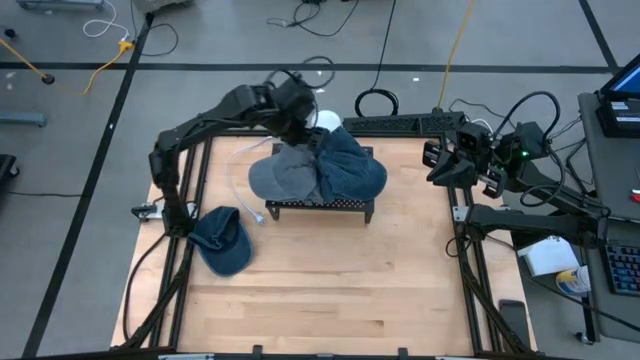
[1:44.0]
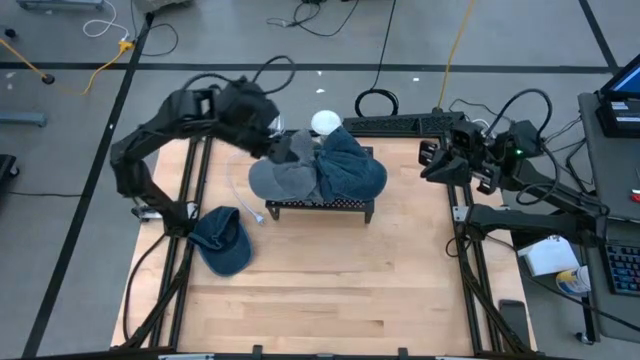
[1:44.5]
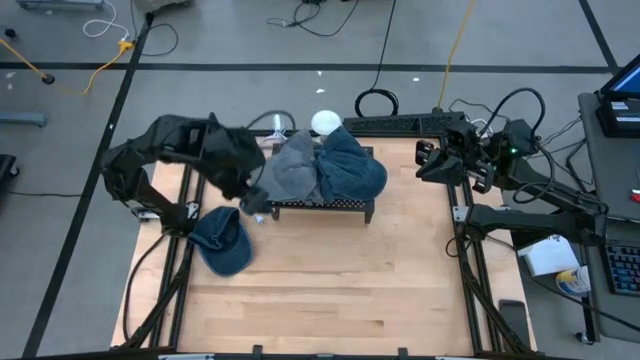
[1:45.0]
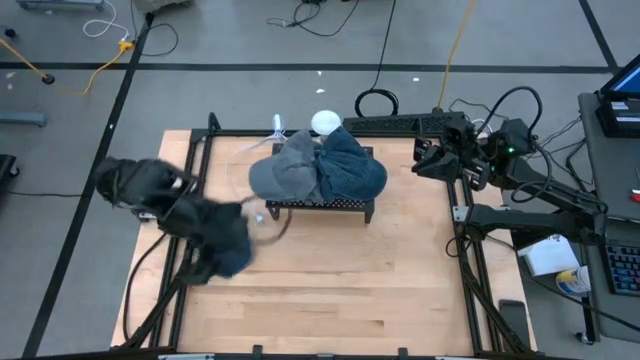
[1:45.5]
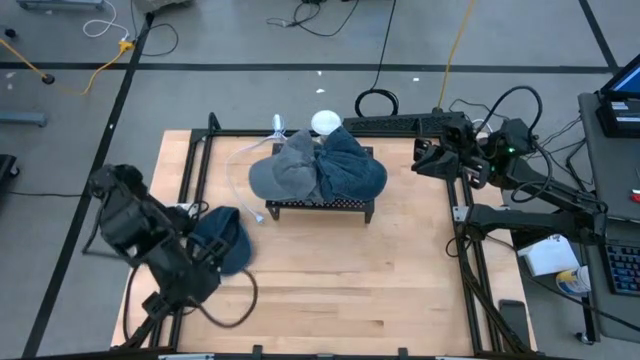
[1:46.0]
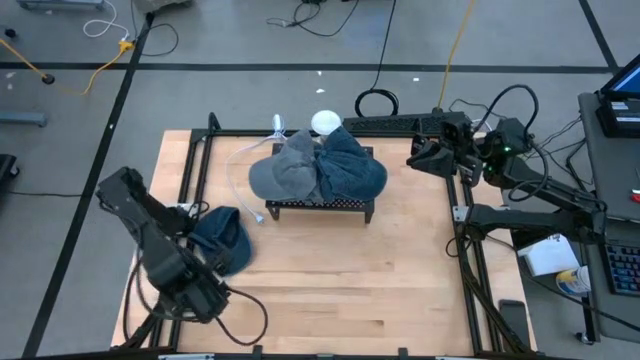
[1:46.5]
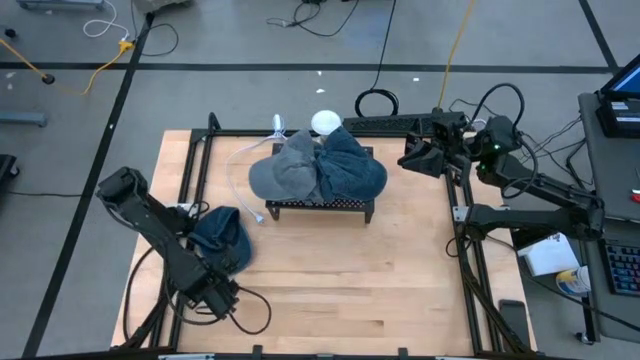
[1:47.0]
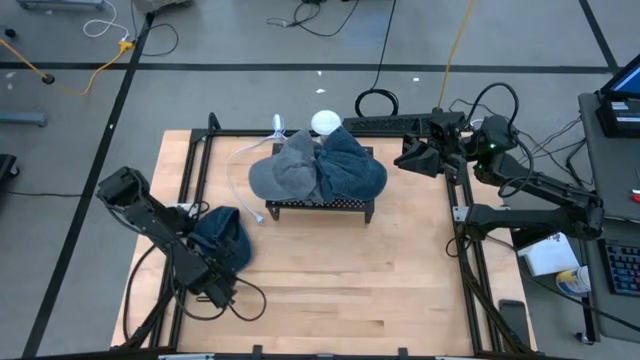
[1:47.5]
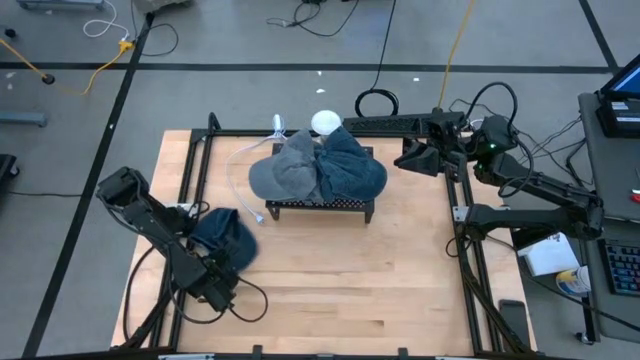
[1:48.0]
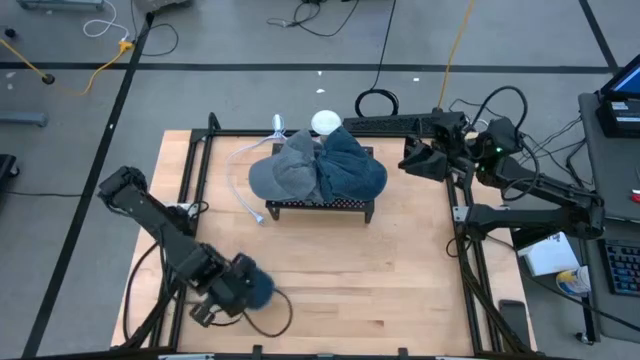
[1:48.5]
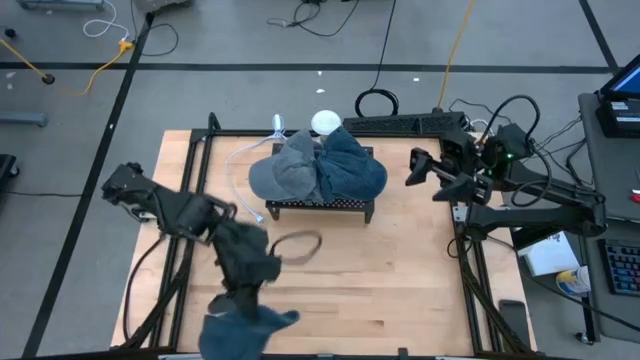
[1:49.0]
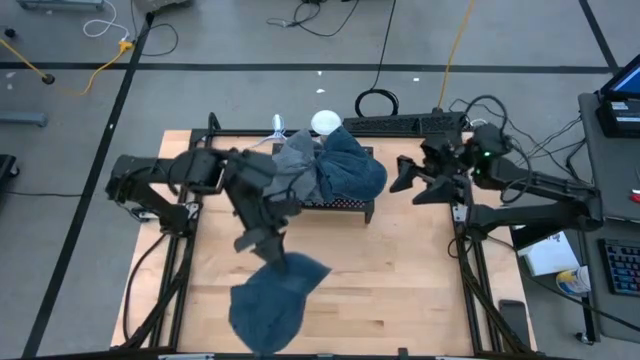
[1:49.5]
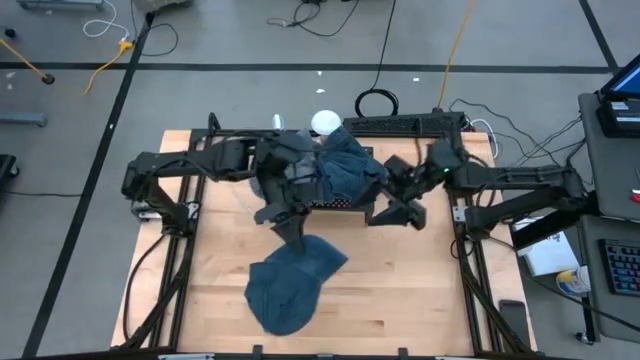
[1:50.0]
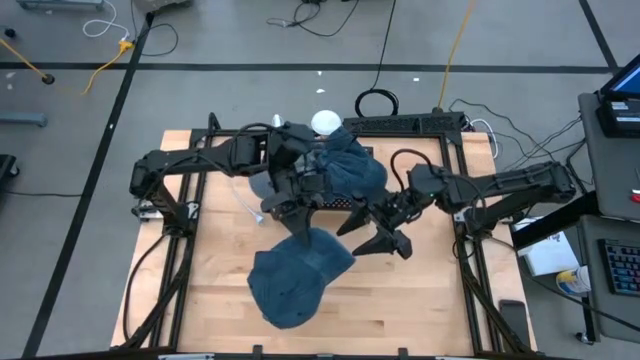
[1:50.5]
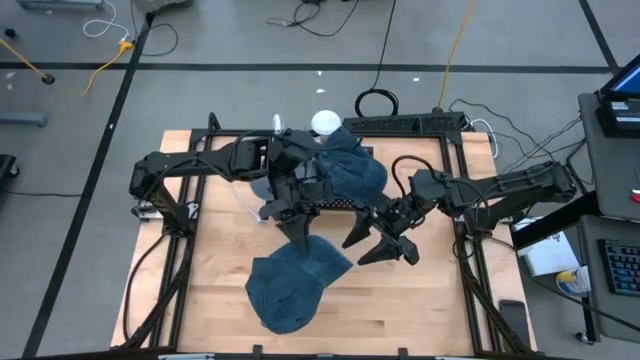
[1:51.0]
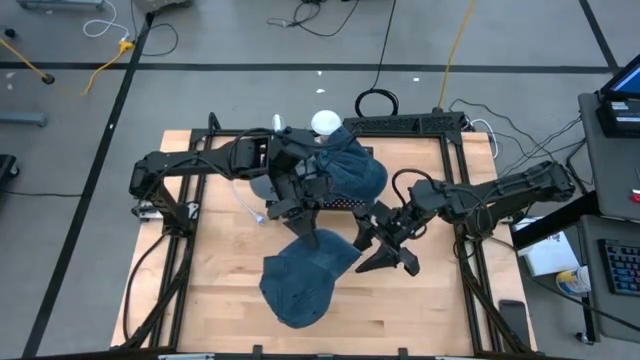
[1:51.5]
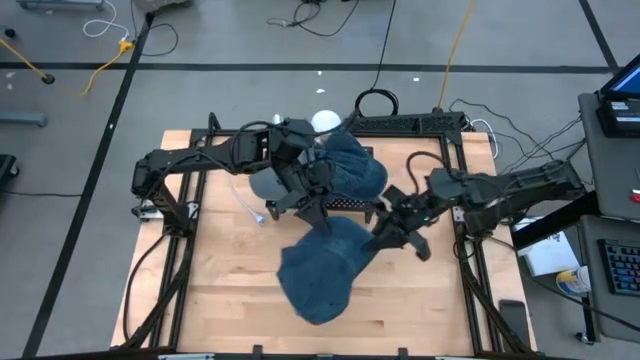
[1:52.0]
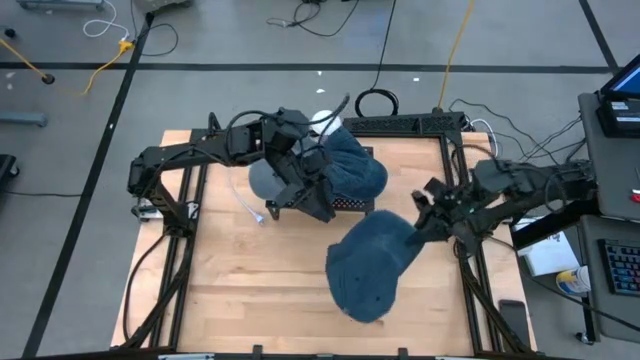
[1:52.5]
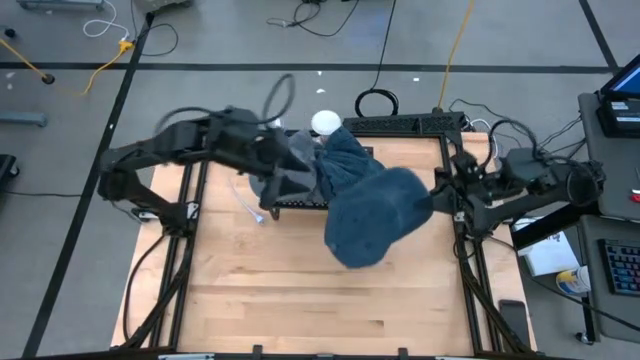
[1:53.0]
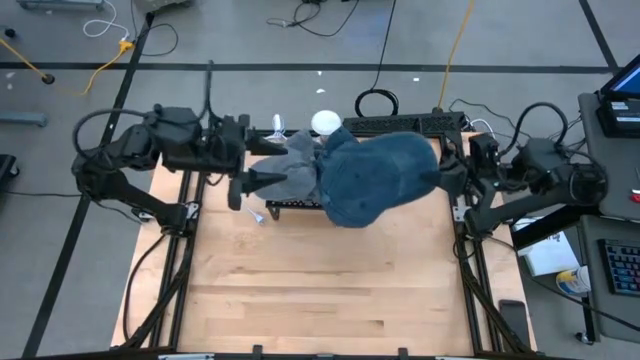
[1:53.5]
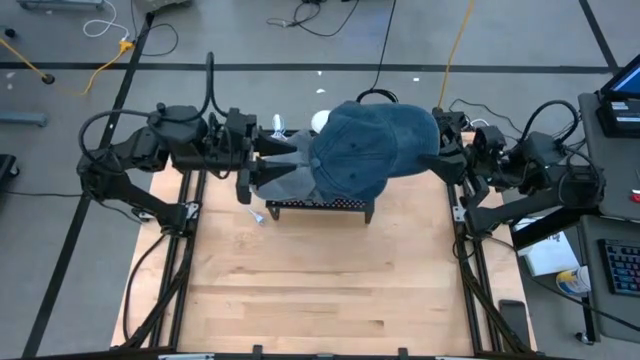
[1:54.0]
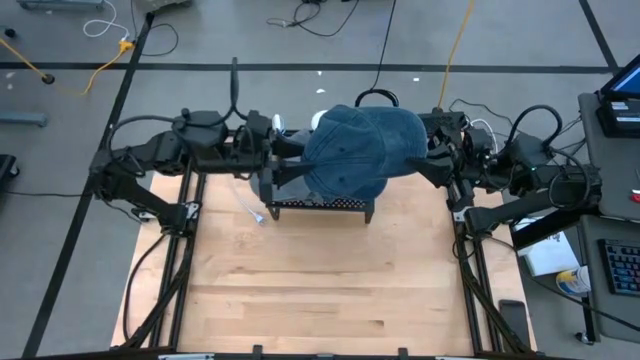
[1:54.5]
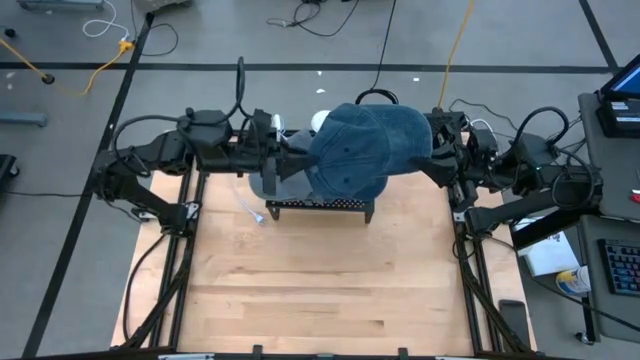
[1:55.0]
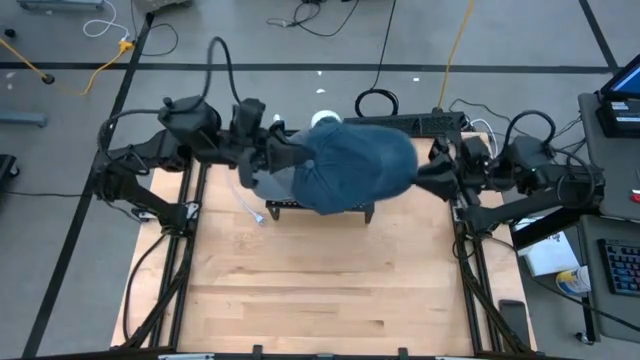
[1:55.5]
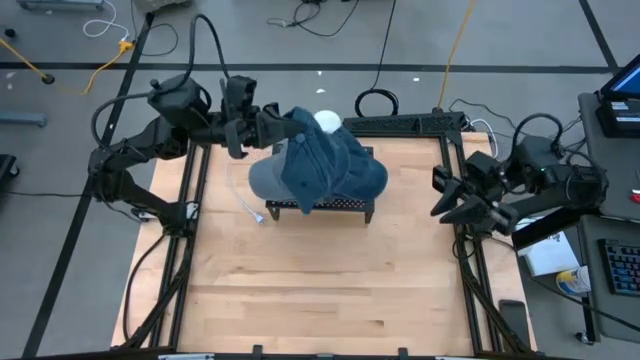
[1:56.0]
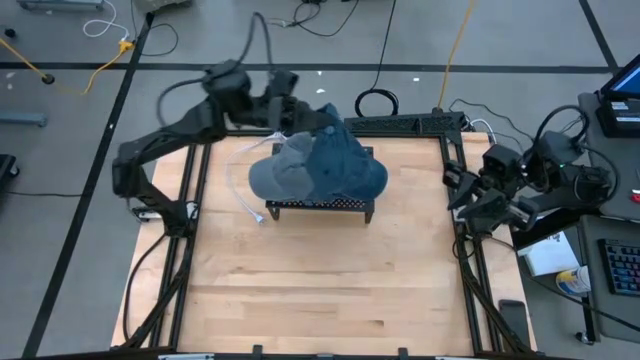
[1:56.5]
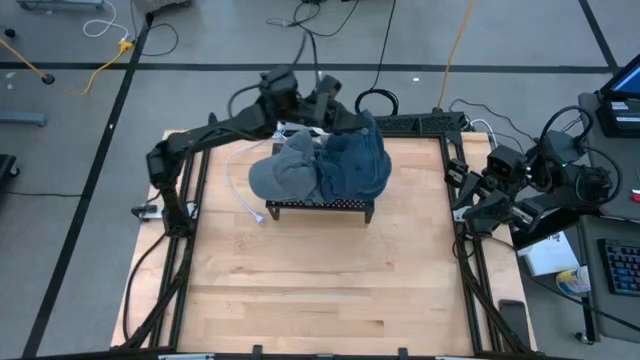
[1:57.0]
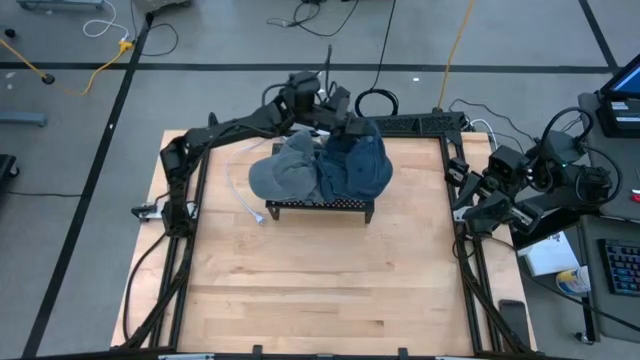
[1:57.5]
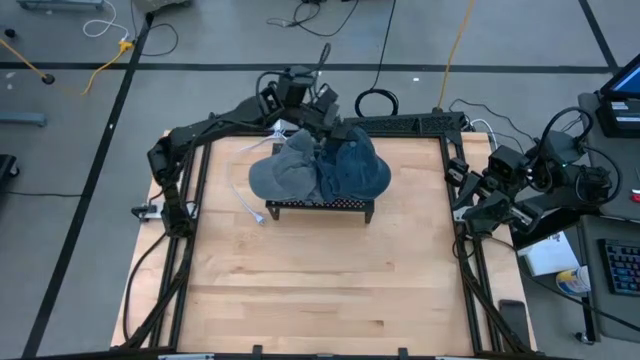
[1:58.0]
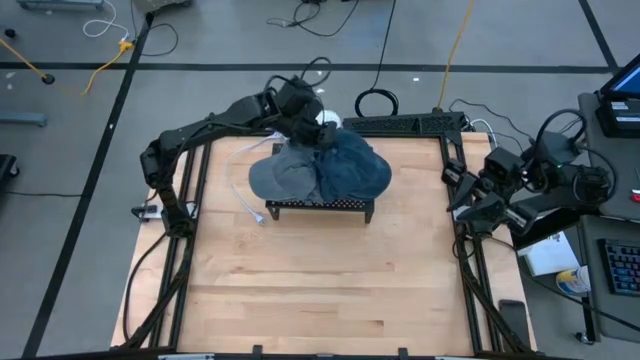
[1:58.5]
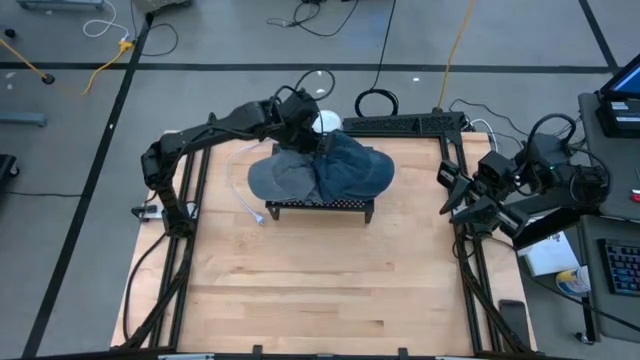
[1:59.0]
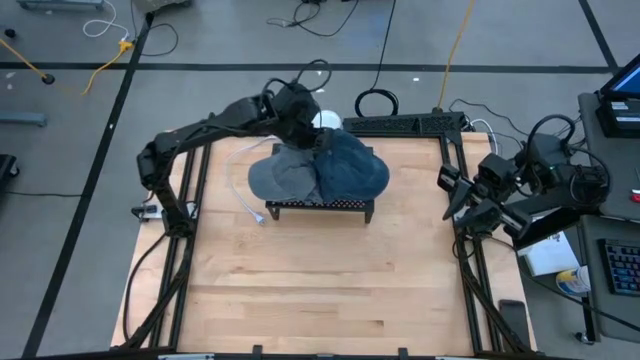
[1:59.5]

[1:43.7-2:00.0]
Task: Pick & Place hat
Stack the blue cap on the blue caps on the shelf

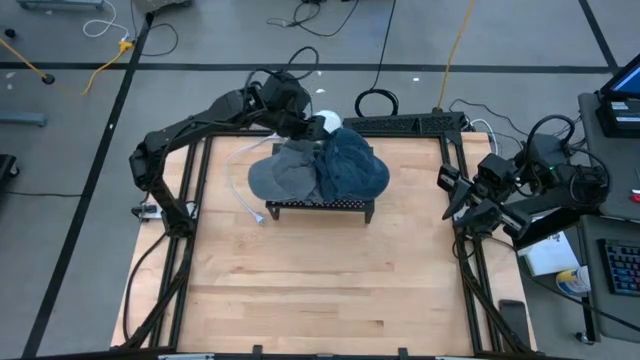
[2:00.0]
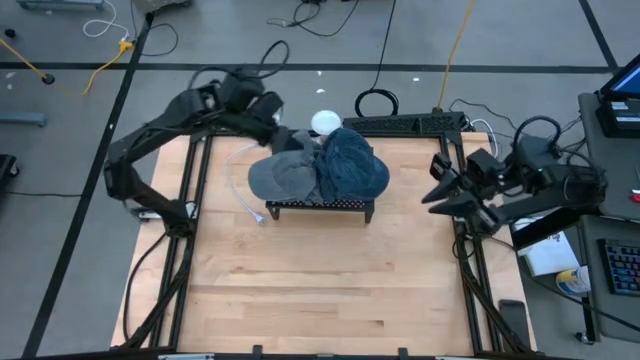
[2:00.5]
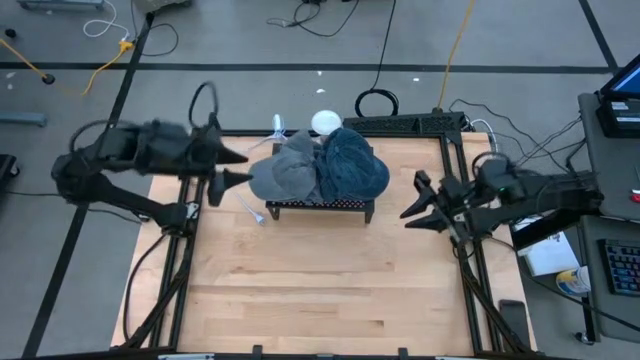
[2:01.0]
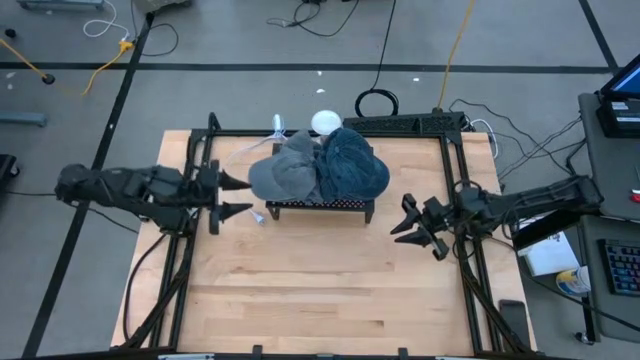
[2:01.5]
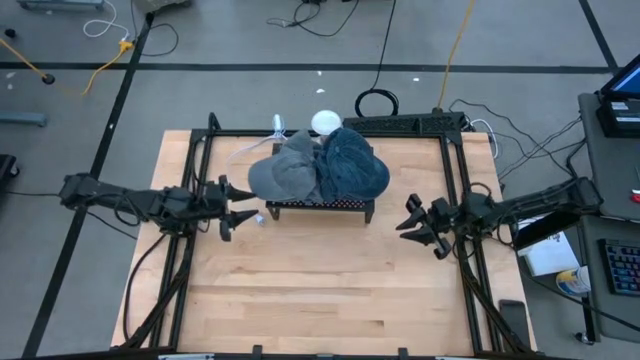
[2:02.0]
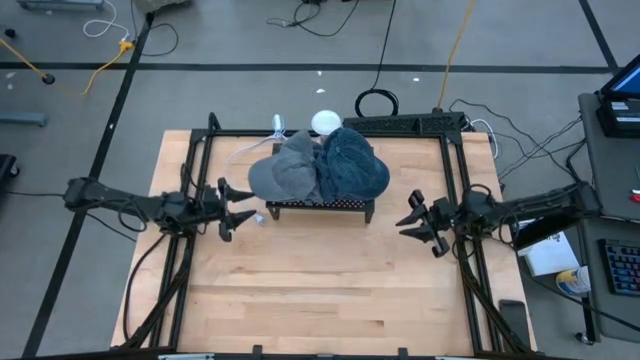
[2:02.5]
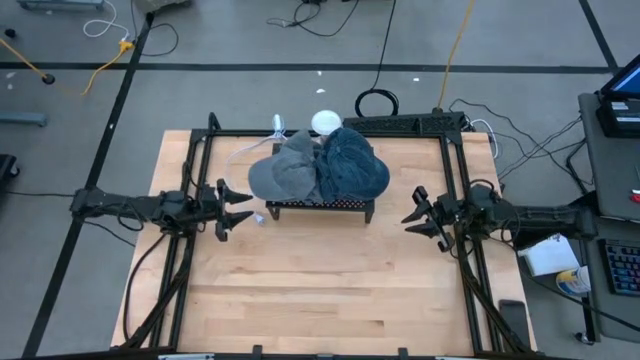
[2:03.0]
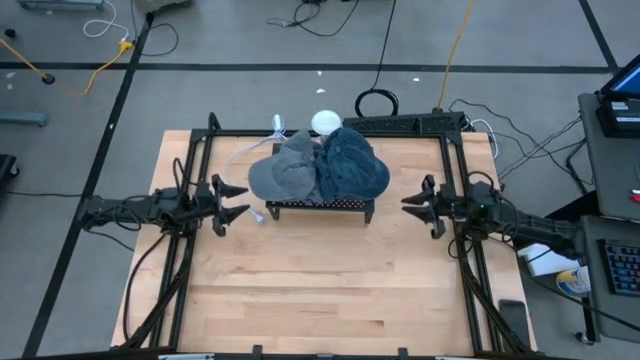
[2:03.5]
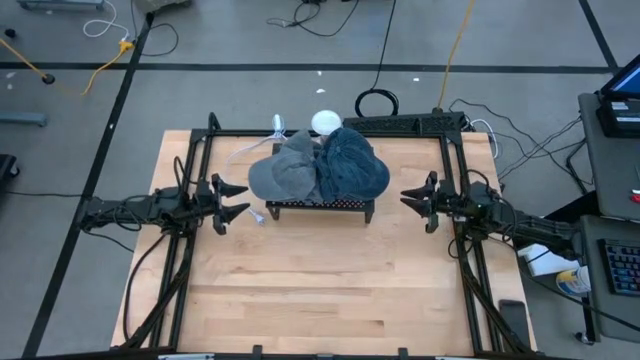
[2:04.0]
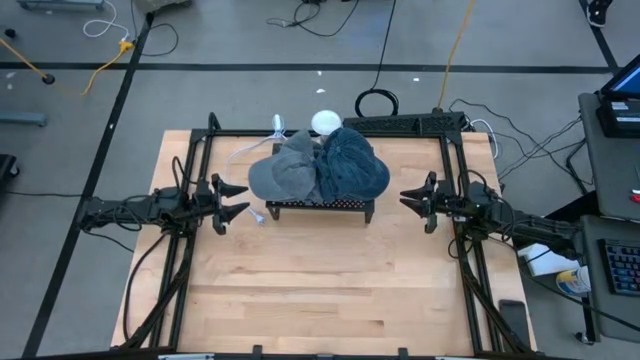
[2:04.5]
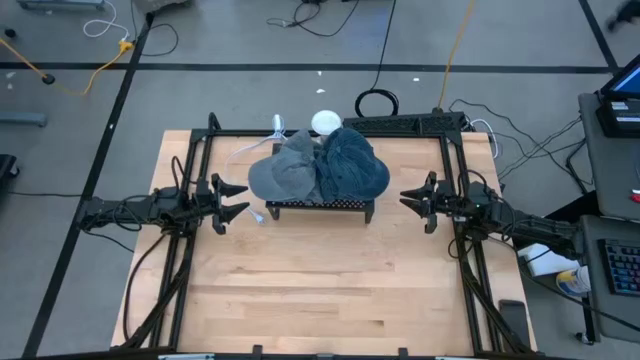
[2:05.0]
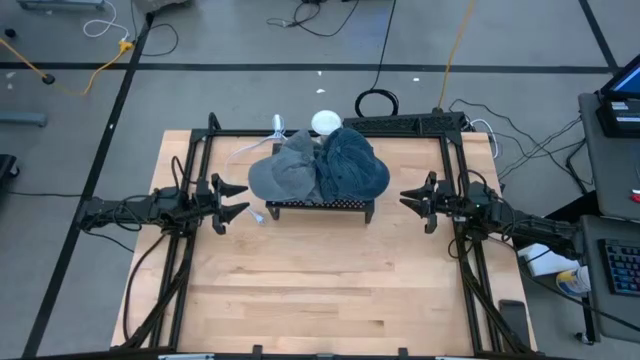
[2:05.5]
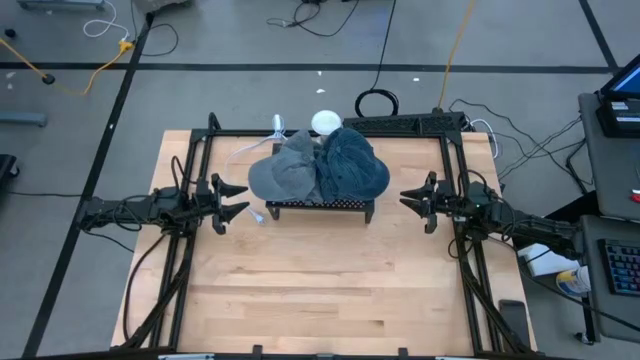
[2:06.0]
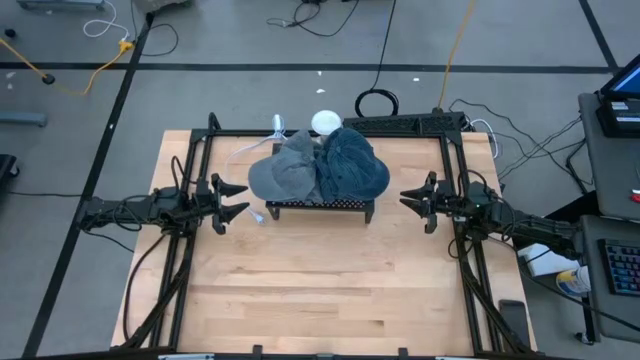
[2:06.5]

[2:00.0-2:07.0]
Return to Home Position
